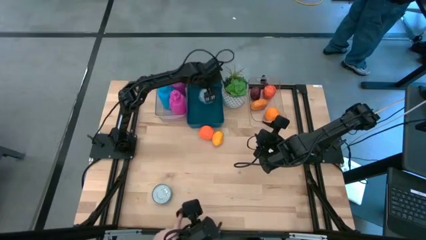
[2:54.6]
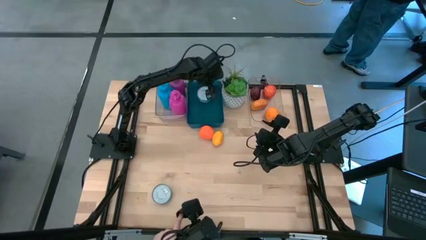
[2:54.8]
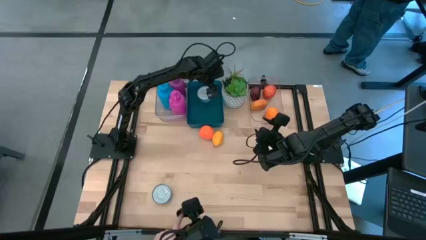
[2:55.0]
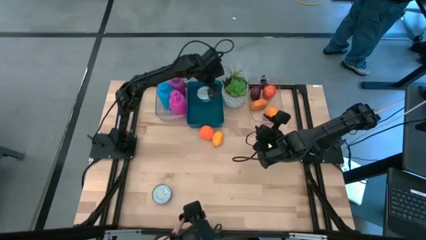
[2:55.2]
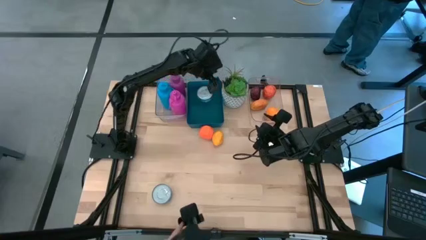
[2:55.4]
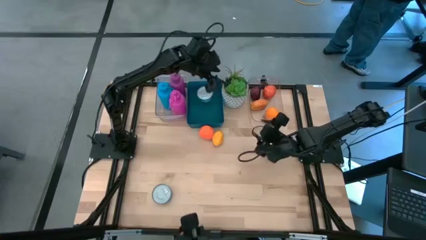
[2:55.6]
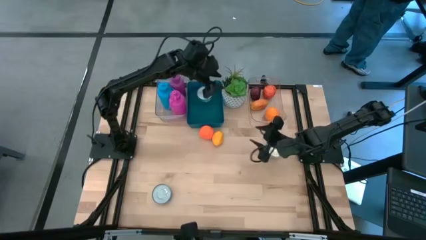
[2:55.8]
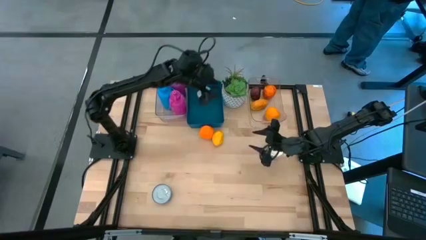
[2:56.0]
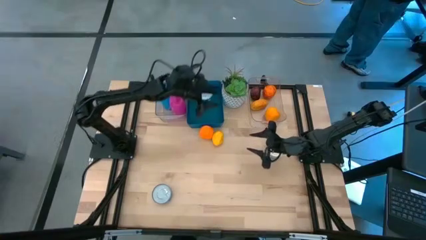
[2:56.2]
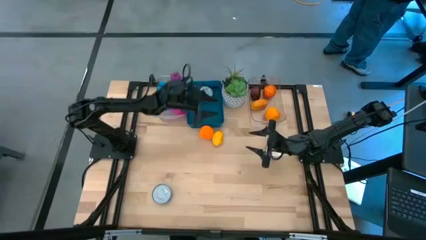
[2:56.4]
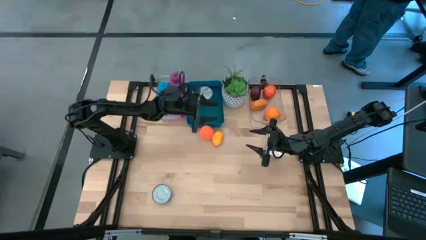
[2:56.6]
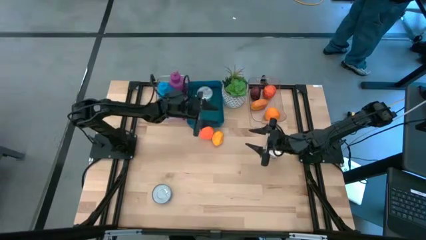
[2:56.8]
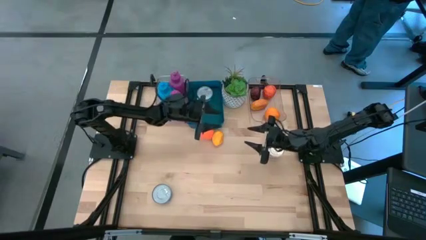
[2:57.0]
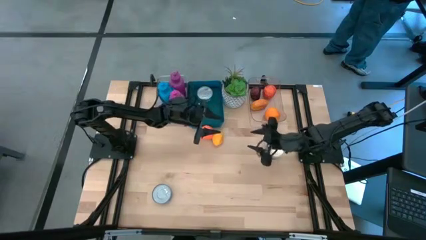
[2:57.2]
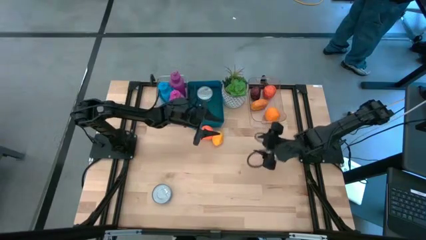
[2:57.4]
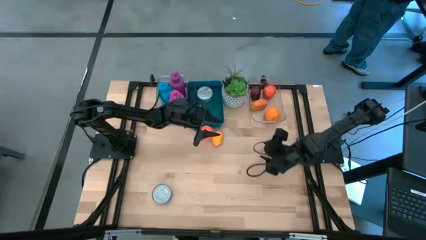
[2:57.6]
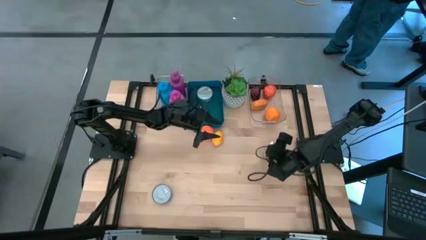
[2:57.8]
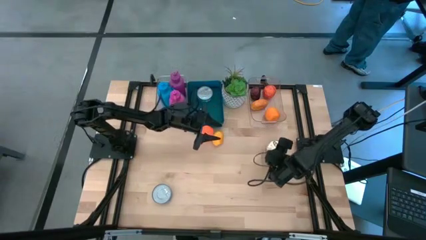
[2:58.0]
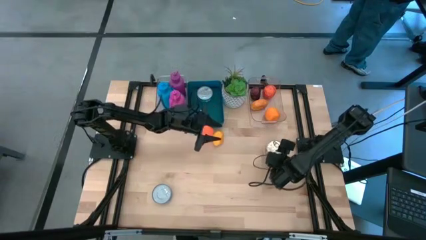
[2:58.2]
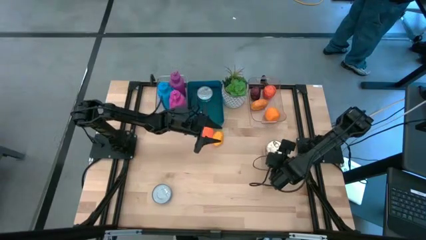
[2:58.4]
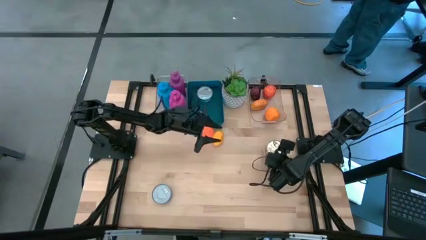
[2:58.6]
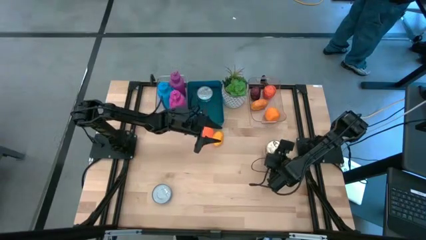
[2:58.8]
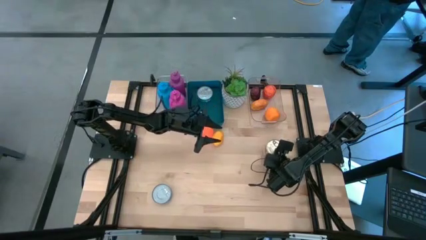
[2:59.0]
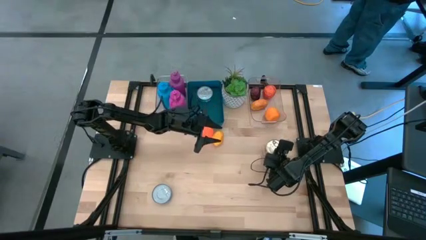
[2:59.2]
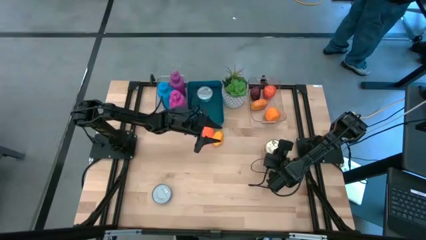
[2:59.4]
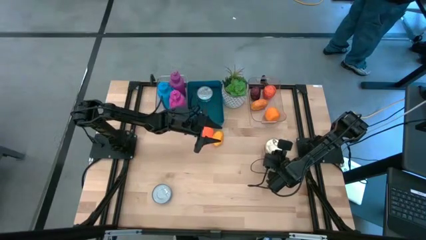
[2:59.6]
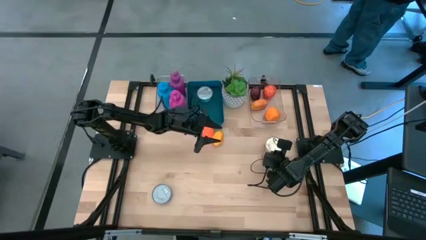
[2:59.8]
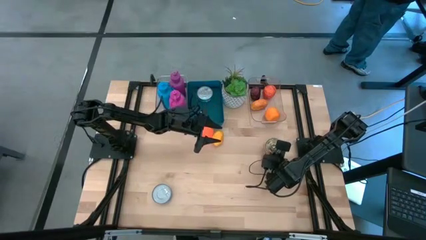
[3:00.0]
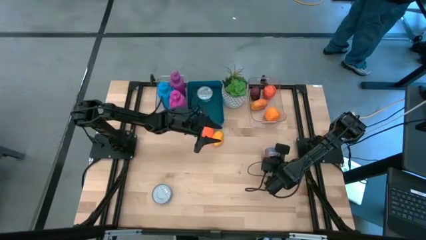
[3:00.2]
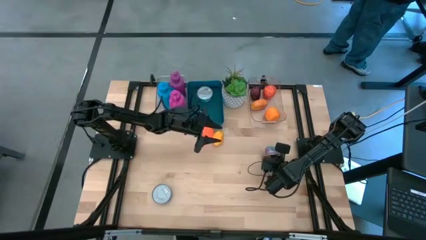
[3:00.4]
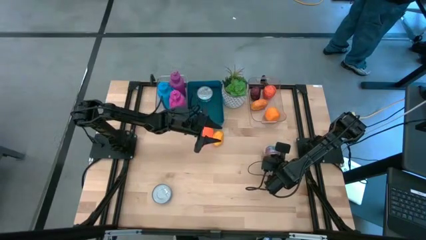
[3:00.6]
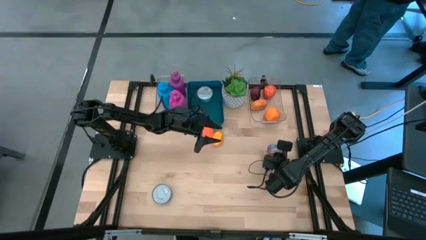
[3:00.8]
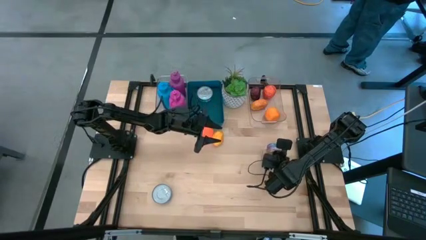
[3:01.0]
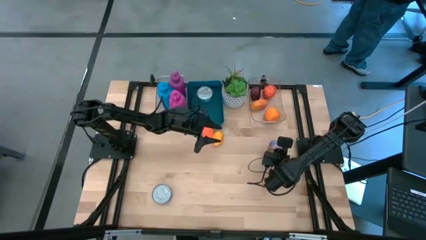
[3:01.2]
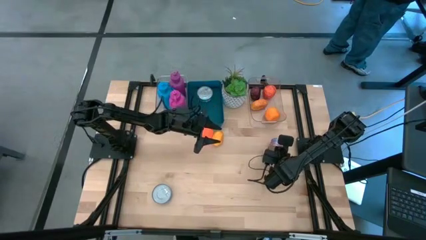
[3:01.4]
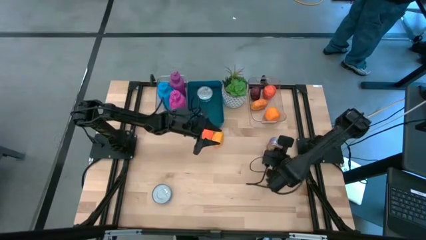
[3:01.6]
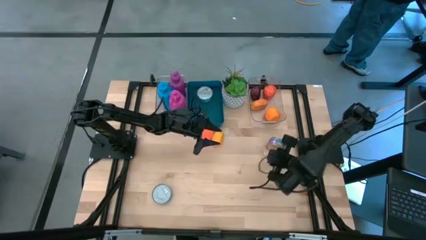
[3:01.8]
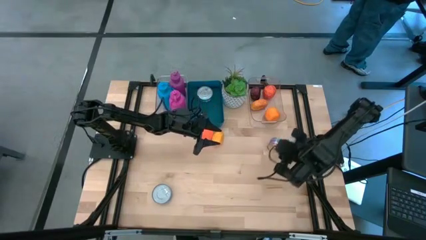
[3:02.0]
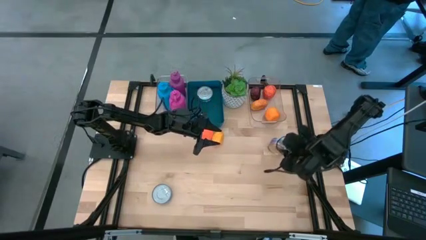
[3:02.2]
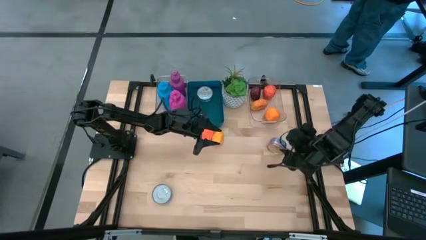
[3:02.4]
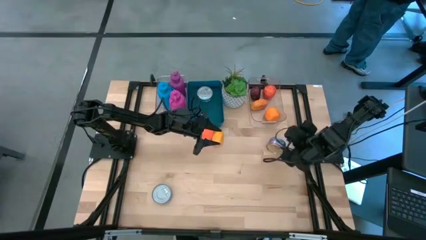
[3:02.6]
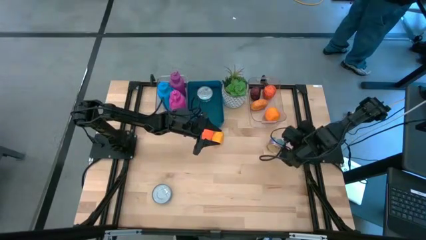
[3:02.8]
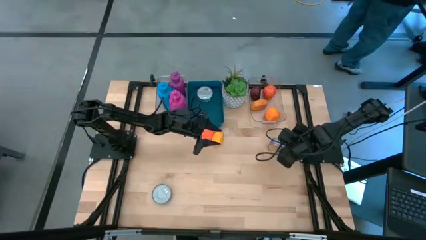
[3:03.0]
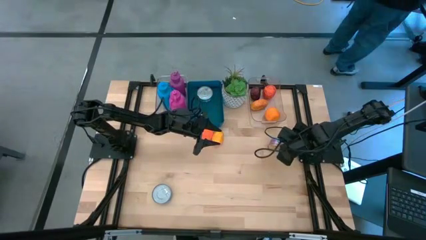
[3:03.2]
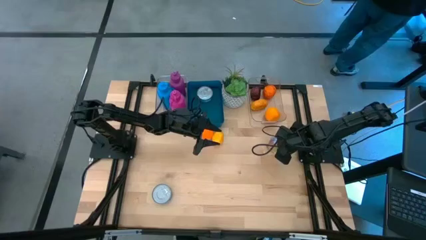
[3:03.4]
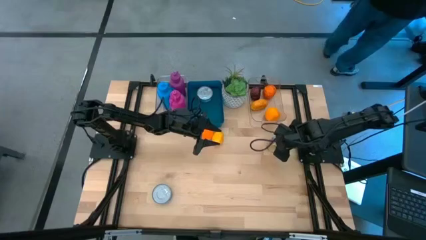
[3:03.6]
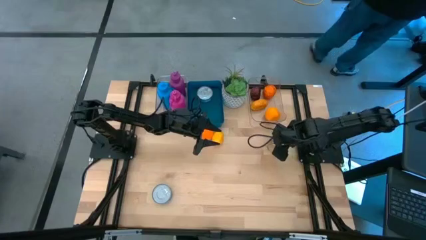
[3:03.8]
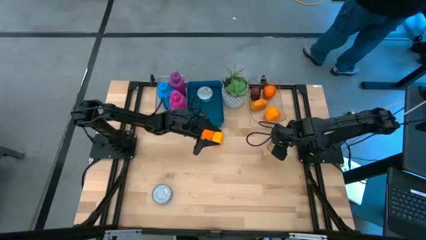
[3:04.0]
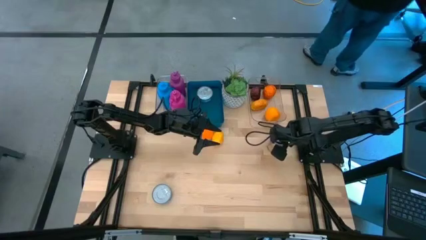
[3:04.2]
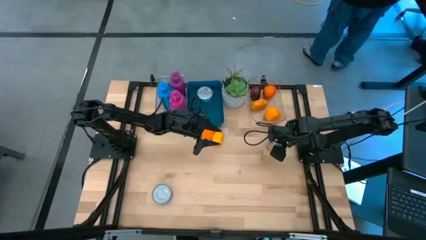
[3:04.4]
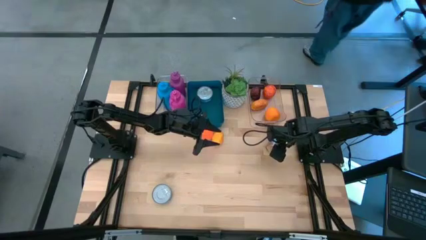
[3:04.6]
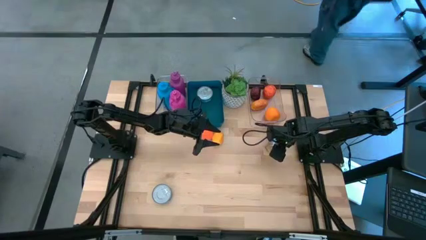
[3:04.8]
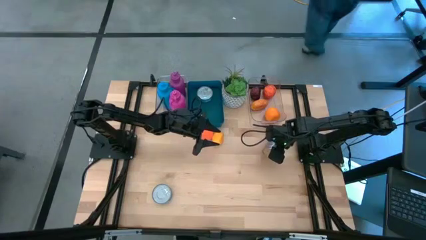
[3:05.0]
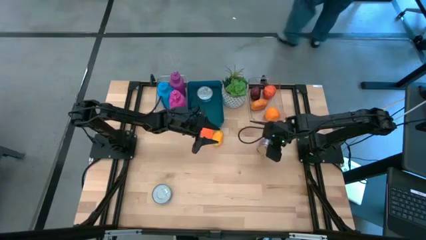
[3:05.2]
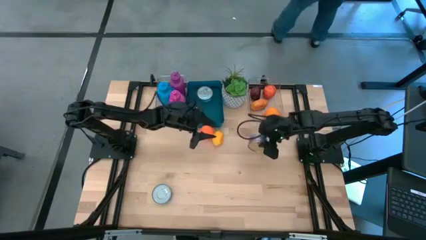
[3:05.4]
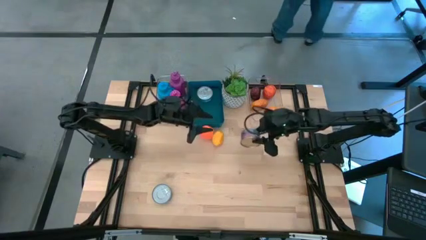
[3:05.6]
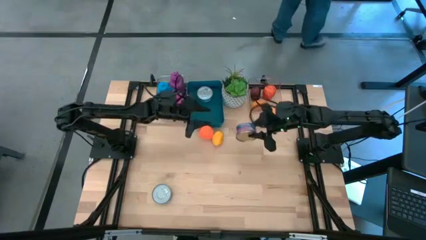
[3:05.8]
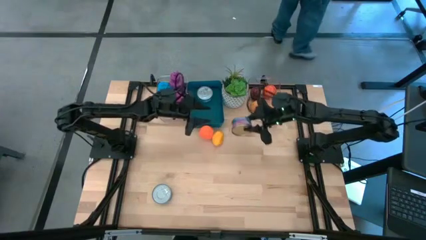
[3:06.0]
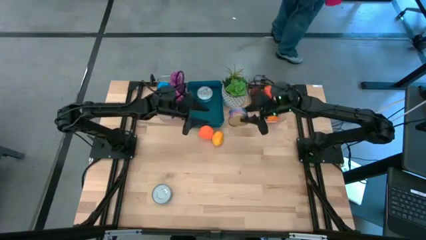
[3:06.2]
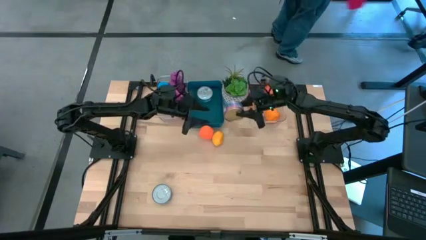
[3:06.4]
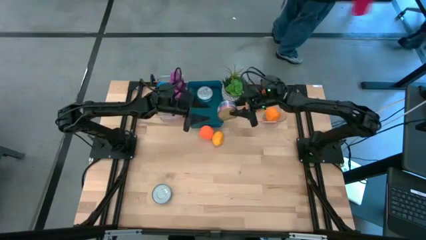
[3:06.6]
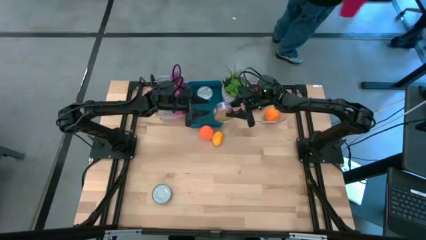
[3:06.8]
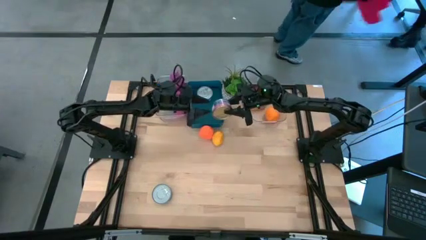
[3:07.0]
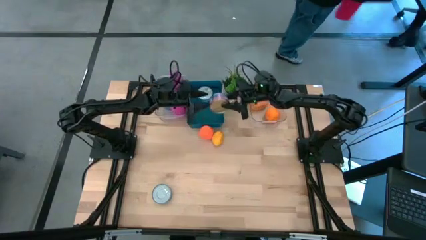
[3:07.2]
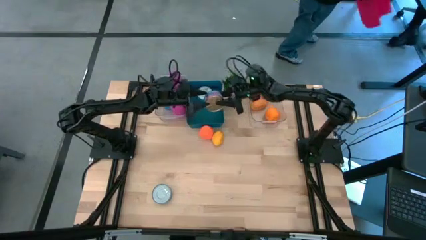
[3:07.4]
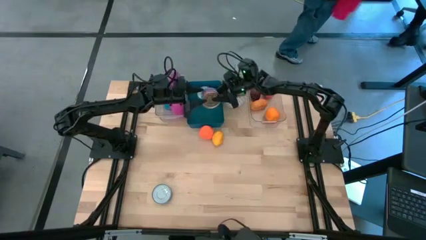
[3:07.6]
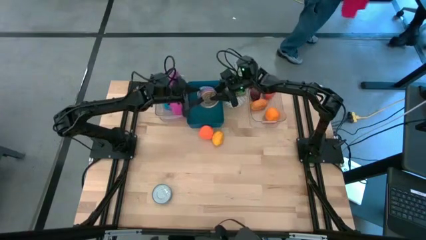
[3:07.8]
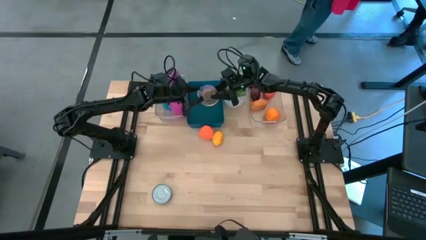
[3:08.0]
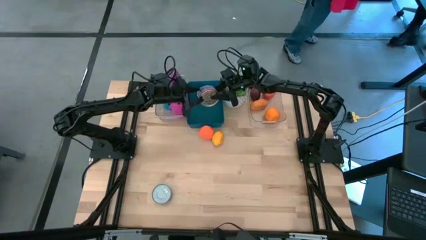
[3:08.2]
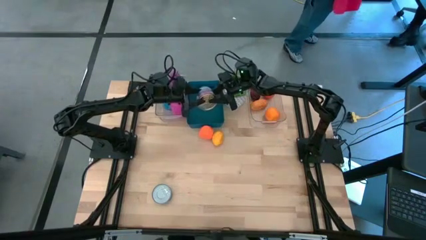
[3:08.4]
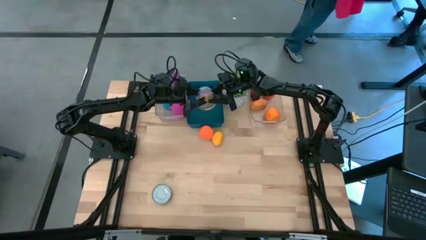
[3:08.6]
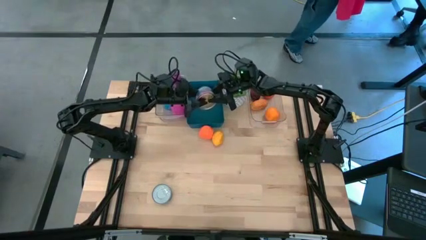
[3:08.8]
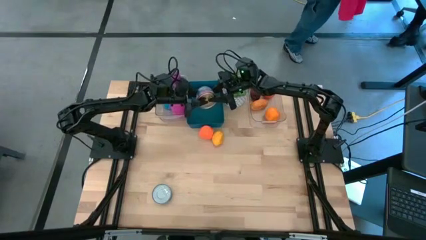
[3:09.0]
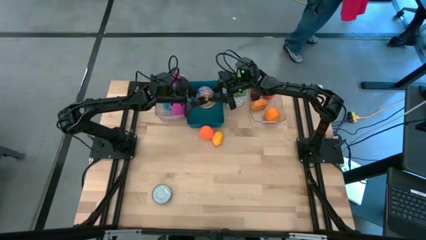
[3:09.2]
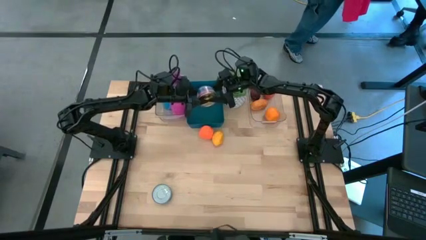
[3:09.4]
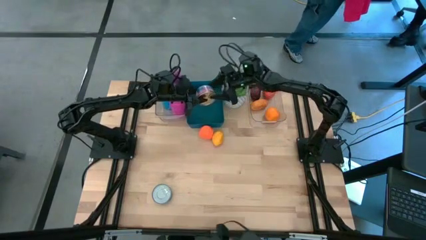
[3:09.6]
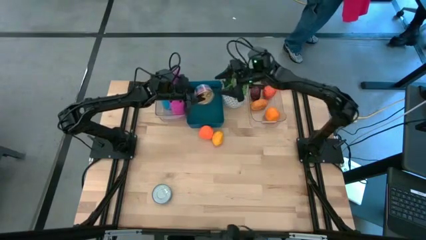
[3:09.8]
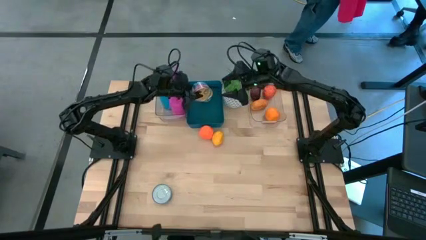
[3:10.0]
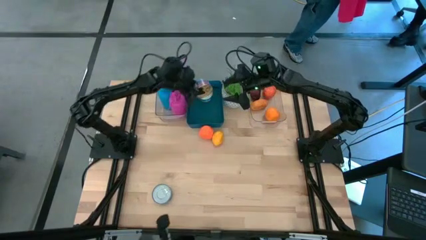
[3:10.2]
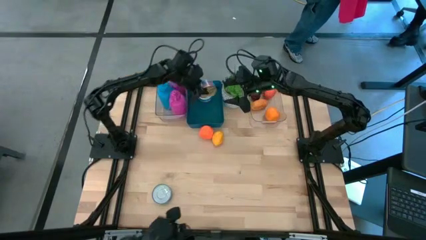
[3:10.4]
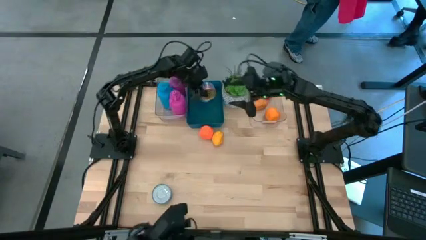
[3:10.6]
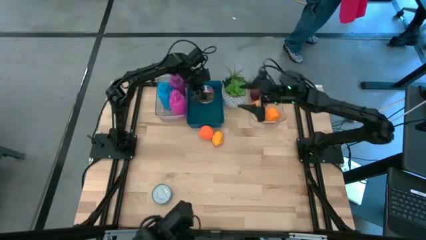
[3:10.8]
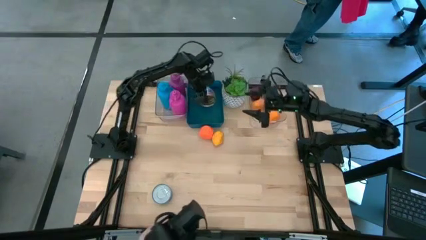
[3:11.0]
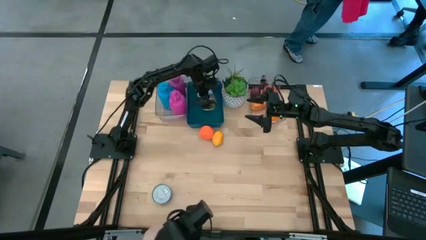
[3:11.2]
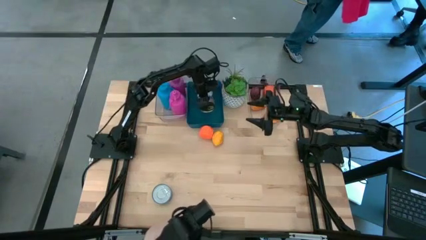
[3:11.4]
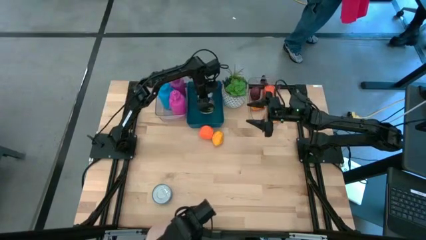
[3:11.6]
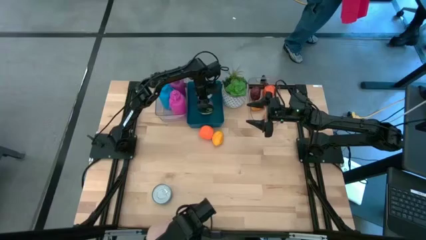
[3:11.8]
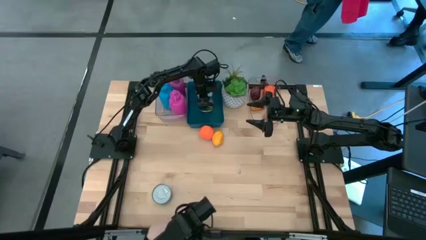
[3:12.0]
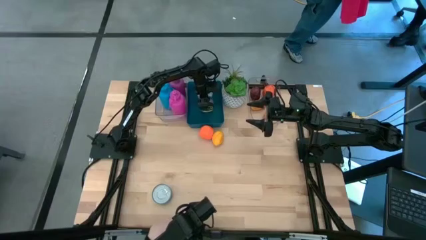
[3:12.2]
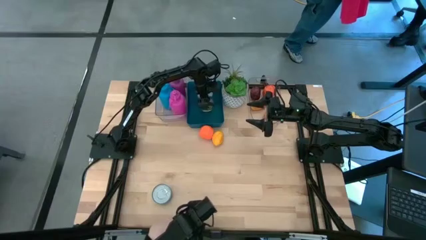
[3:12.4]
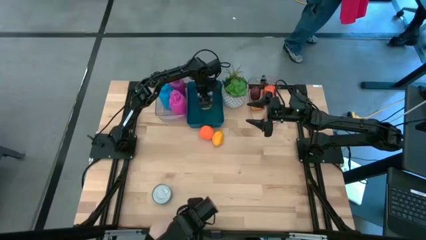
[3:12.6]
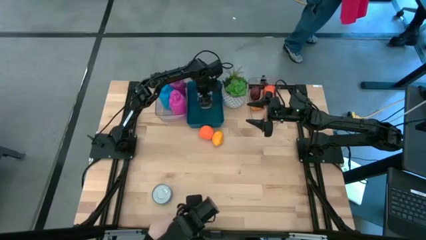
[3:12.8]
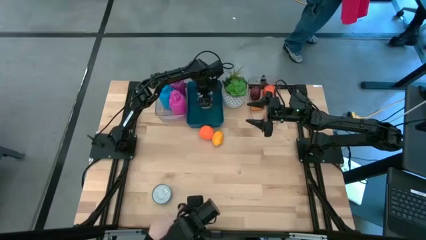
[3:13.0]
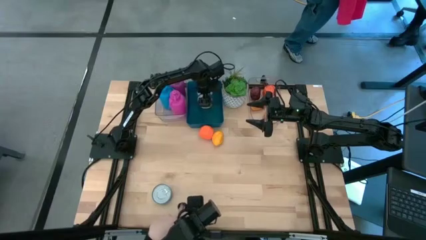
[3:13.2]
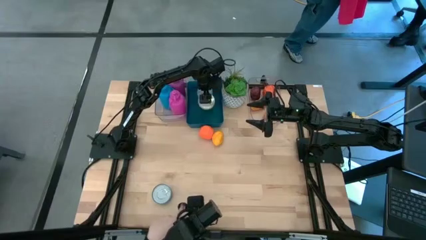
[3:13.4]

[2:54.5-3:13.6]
Task: Pick & Place Food Item
Put the blue pink tuna can into the blue bin
